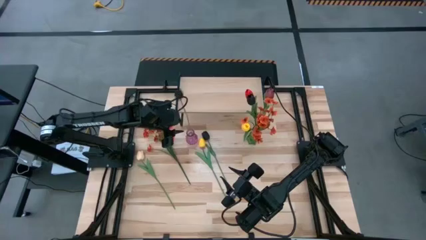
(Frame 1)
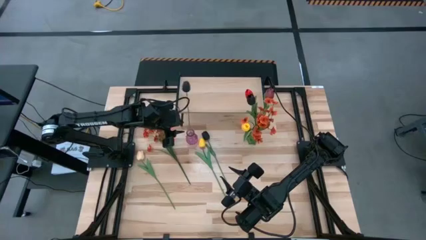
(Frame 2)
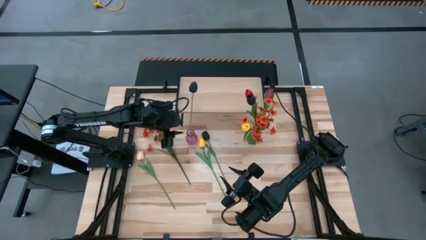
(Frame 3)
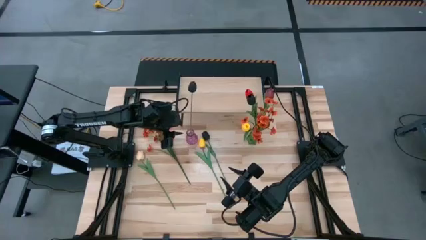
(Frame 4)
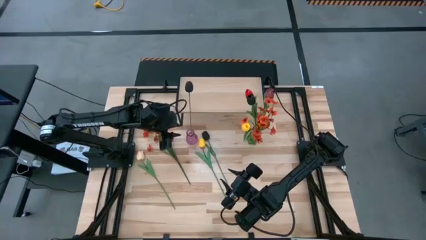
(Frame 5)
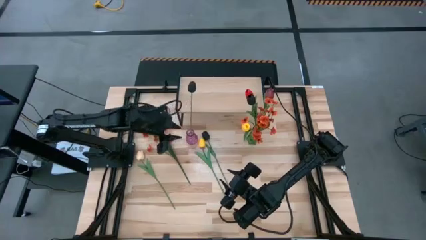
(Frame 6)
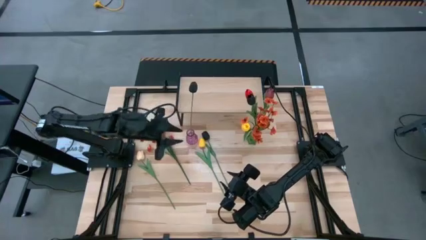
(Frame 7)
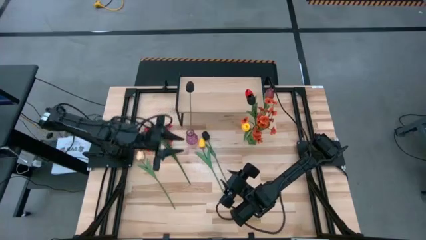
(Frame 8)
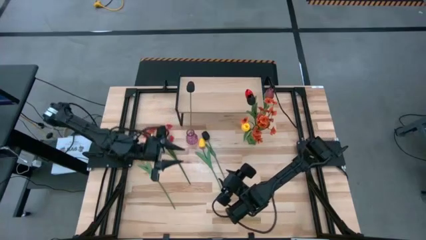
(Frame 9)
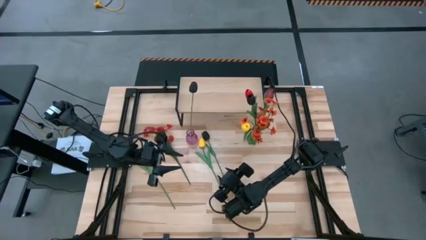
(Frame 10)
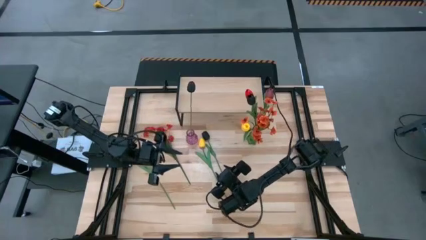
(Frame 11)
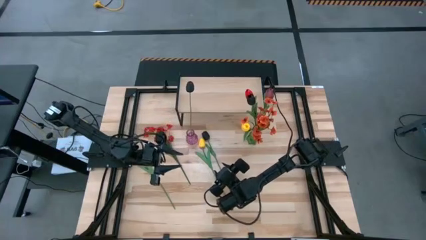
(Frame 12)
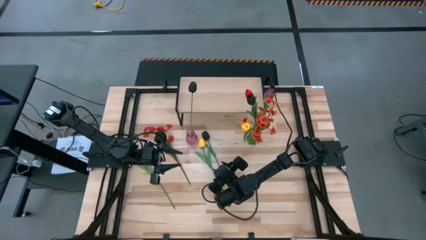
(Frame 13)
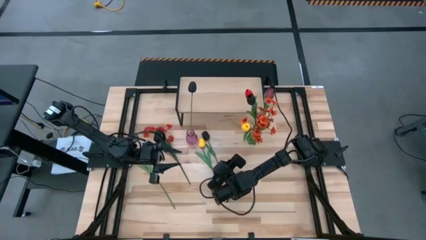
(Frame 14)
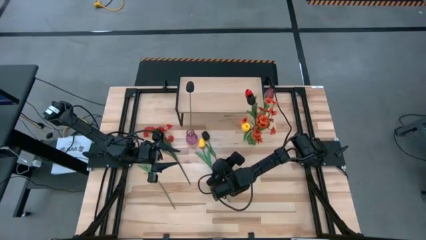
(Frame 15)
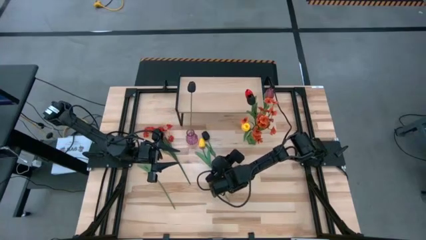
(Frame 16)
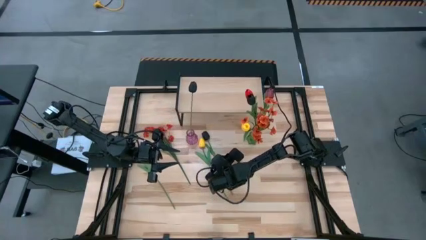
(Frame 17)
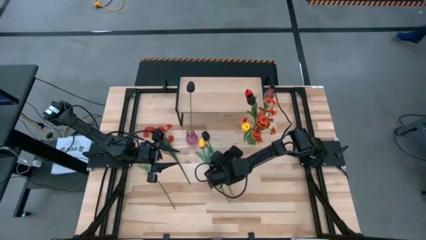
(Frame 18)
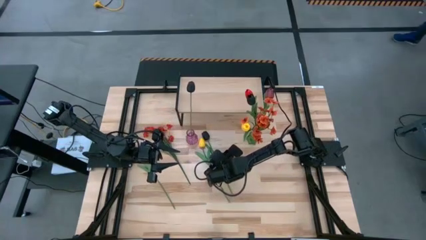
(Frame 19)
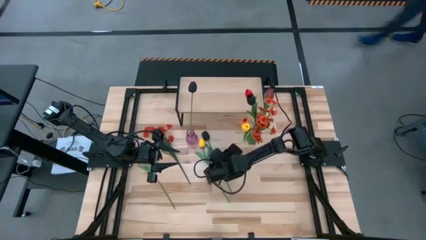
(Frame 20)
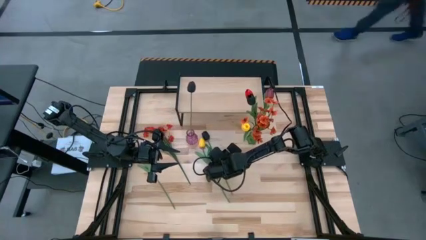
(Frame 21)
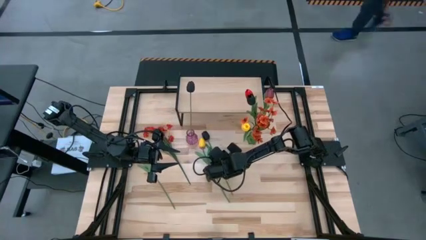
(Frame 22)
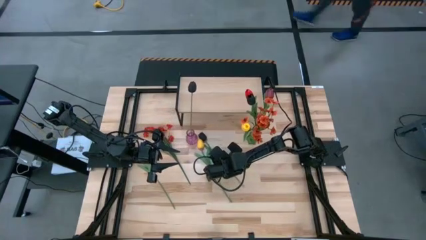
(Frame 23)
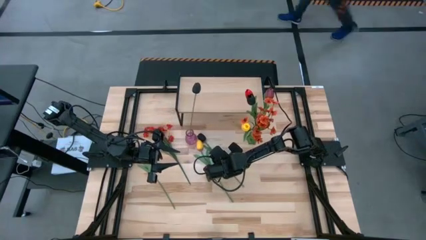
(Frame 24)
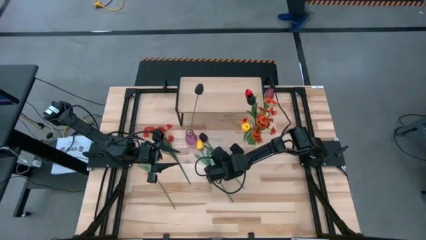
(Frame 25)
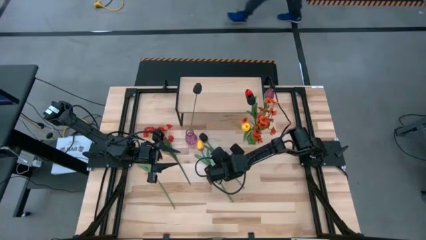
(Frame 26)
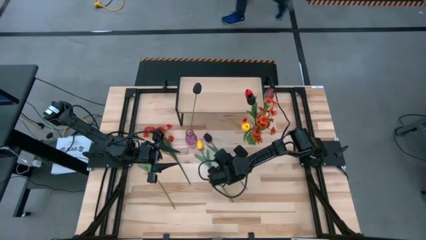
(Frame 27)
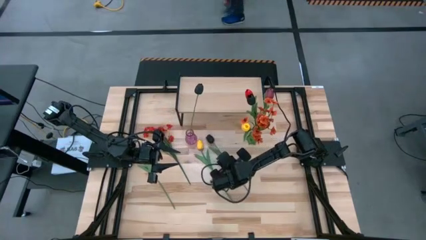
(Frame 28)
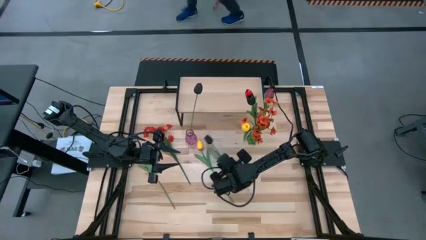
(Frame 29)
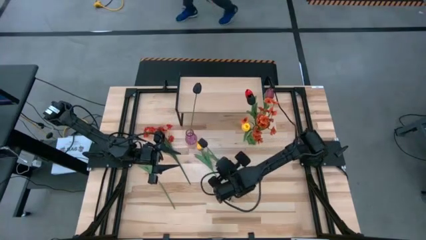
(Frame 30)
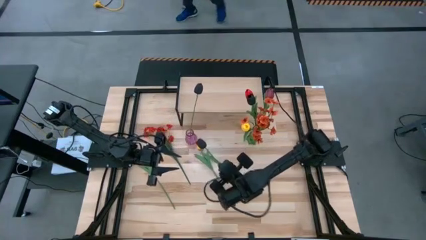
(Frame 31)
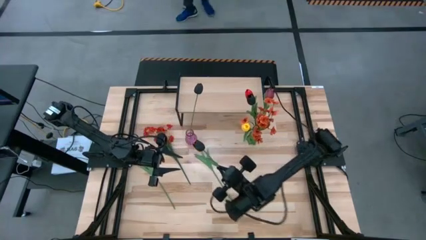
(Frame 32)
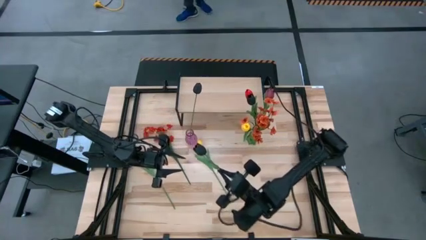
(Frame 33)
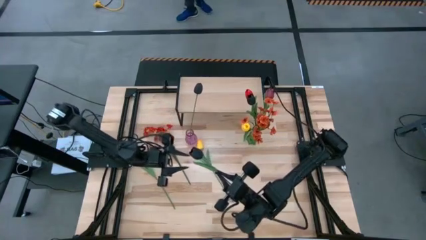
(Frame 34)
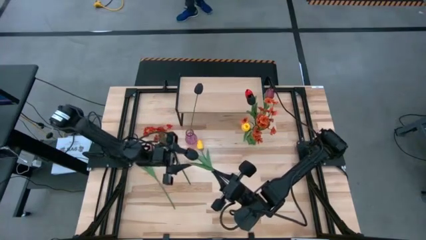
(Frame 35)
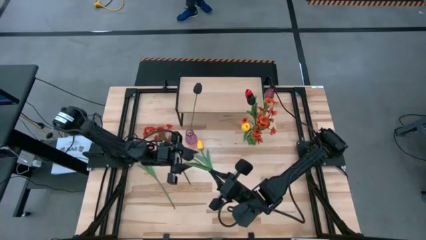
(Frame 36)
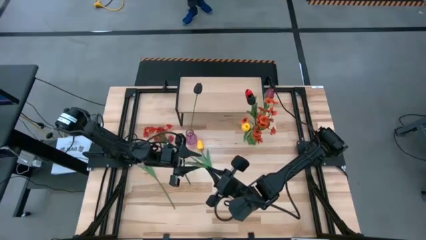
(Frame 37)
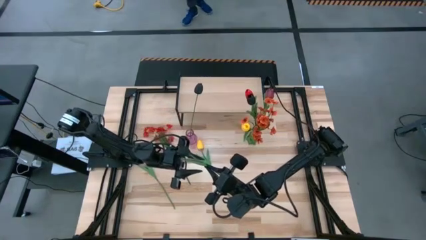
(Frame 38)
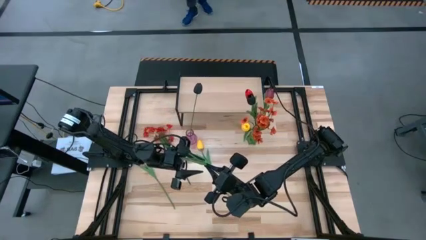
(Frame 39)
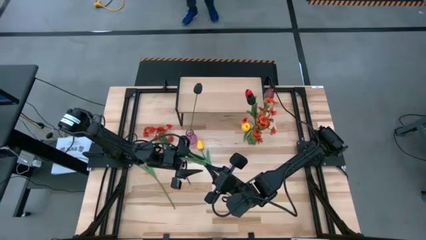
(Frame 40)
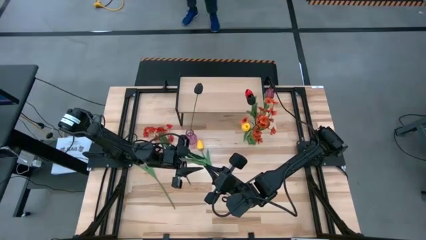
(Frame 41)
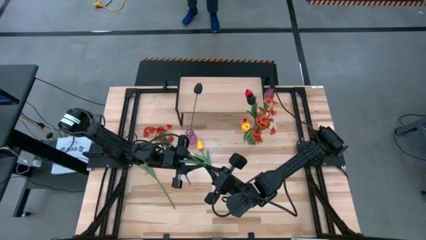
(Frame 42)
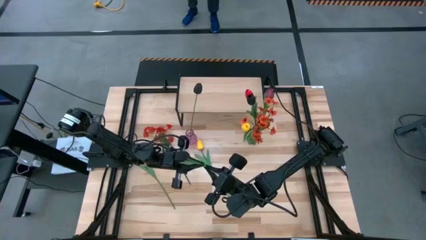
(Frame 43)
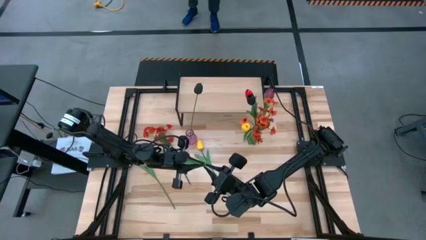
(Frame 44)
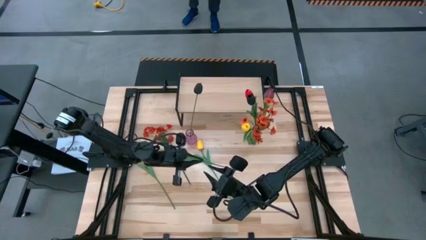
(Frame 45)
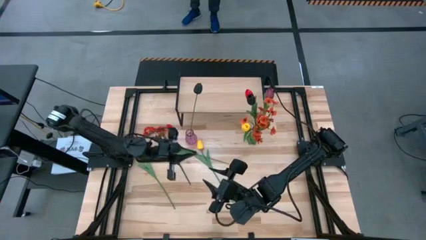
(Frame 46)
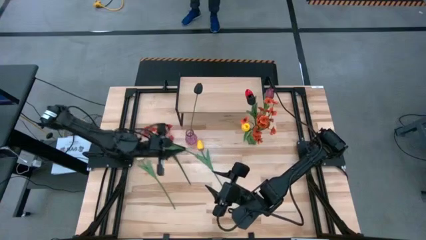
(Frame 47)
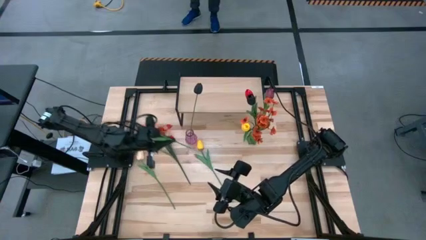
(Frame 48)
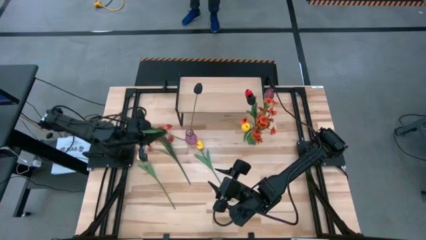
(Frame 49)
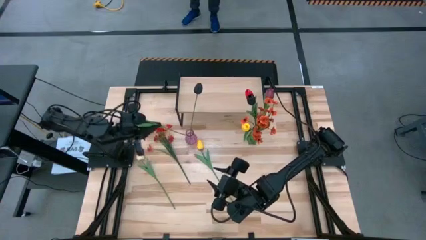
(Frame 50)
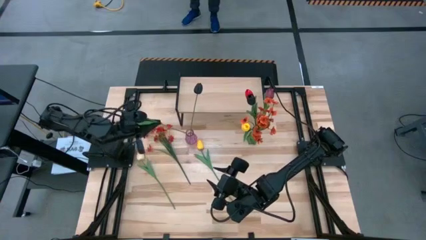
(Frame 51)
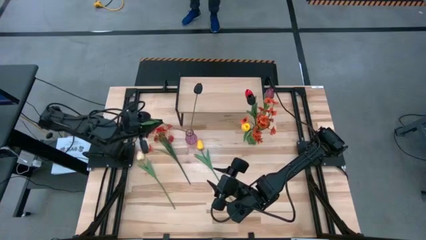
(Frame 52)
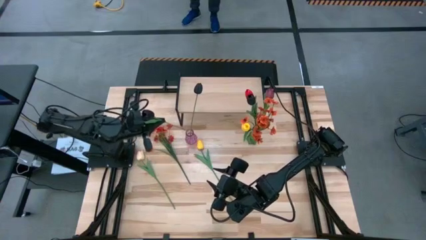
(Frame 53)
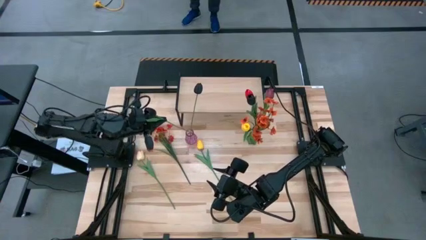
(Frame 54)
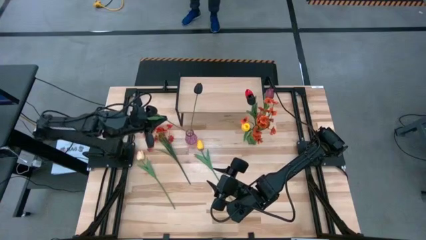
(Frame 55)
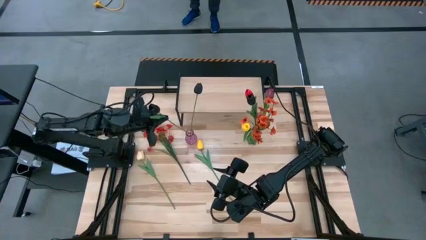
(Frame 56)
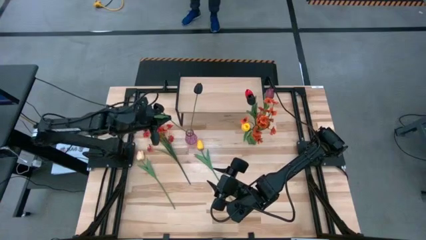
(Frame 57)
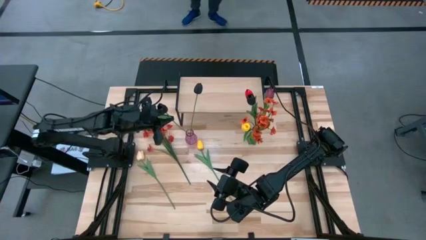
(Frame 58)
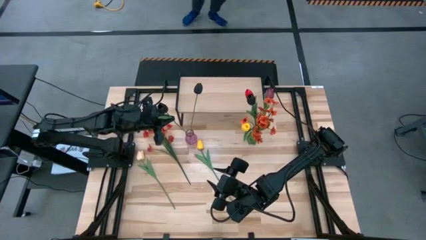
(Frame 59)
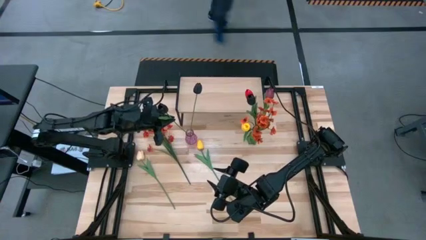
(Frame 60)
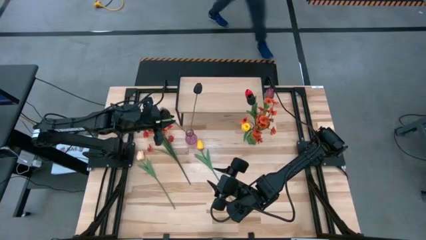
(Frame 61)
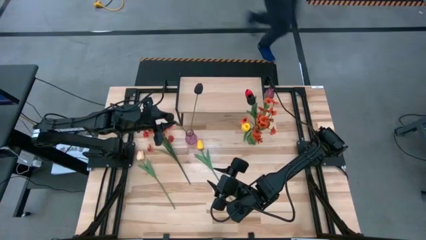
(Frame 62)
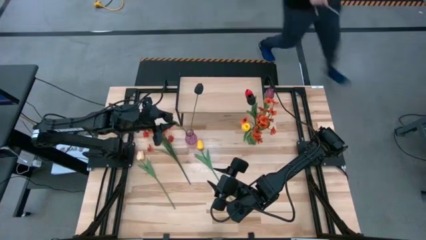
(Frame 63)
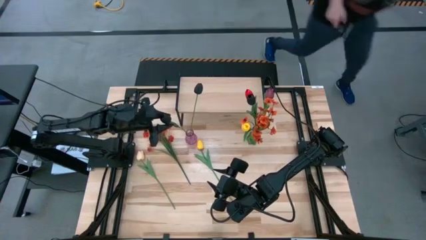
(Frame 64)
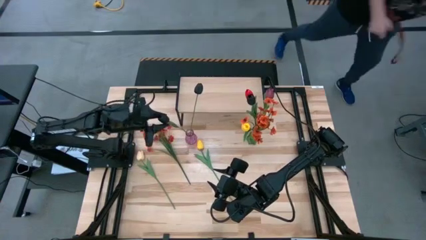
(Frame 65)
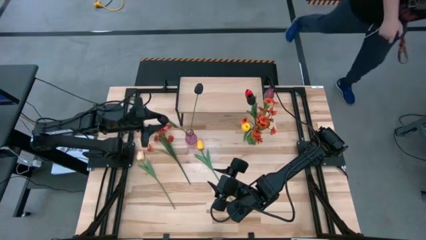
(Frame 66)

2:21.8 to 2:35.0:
Task: Pick and place flowers into a vace then onto a shelf
Put the black tulip into the purple vase
